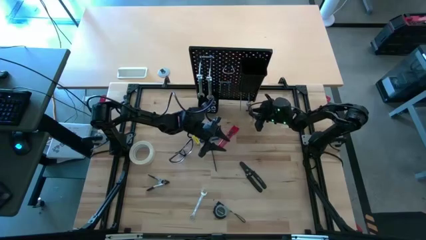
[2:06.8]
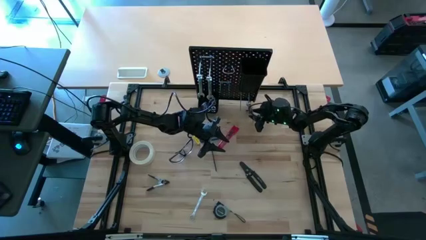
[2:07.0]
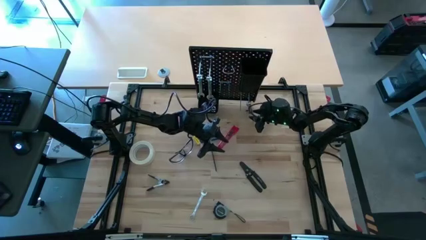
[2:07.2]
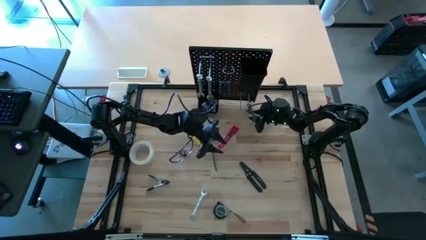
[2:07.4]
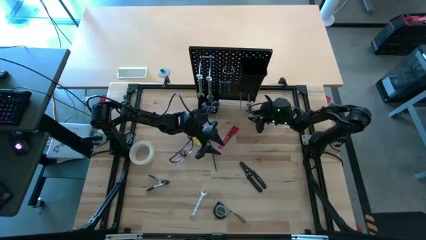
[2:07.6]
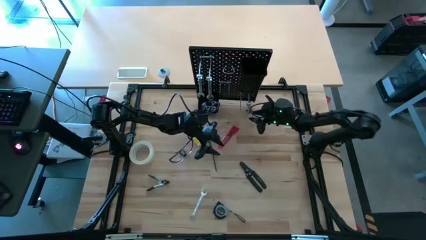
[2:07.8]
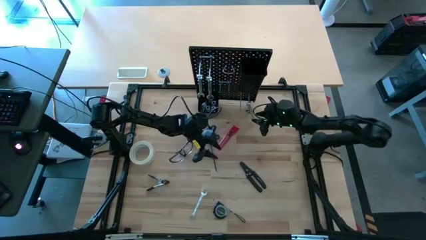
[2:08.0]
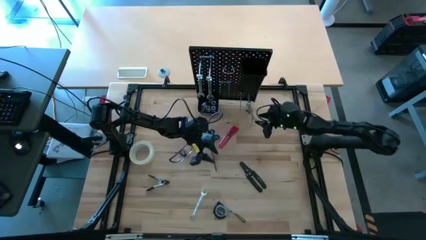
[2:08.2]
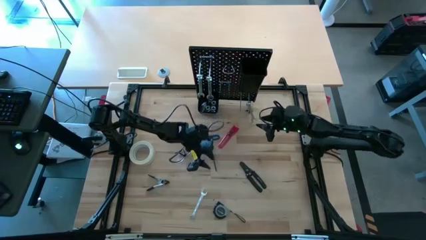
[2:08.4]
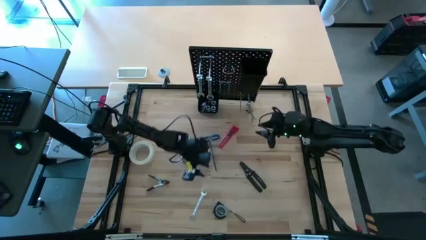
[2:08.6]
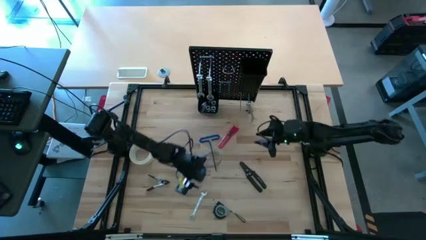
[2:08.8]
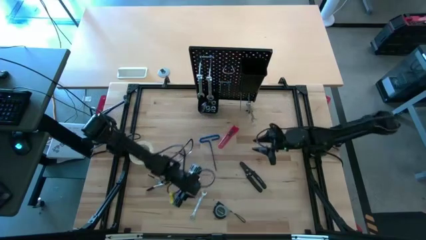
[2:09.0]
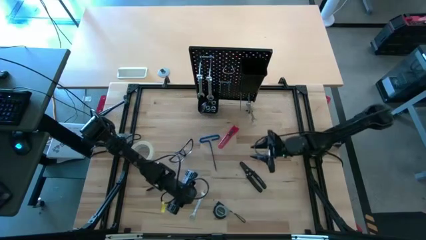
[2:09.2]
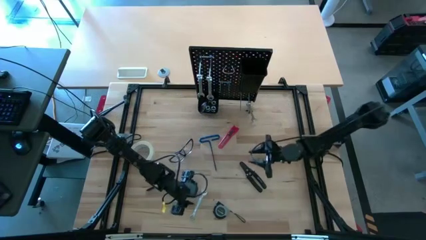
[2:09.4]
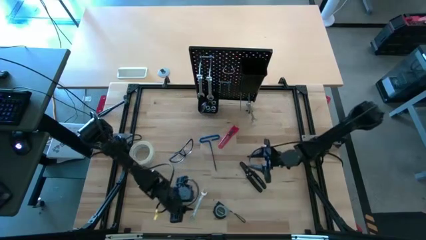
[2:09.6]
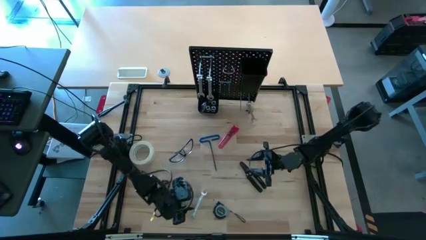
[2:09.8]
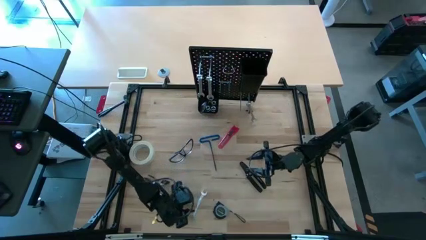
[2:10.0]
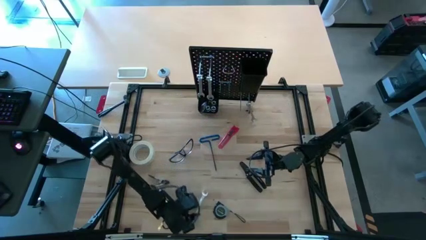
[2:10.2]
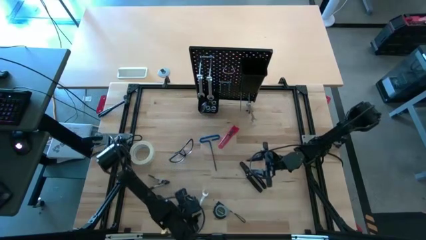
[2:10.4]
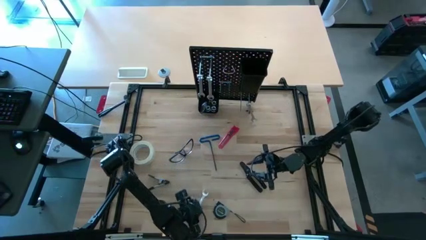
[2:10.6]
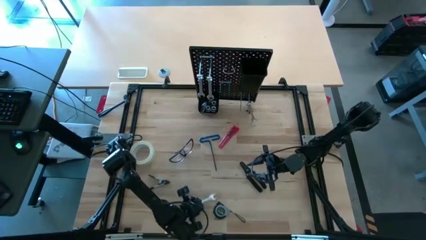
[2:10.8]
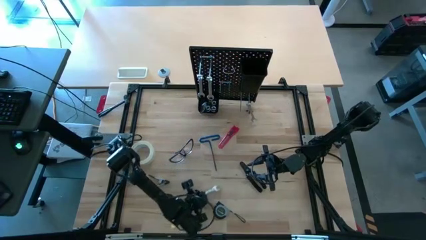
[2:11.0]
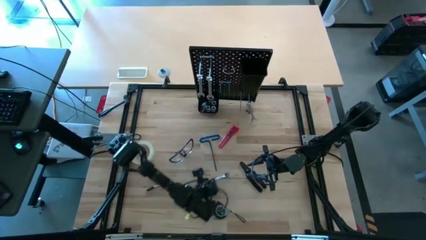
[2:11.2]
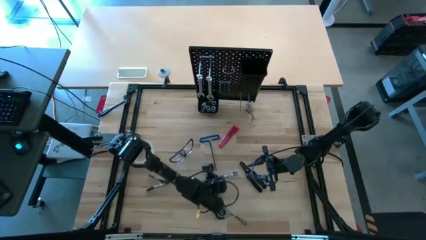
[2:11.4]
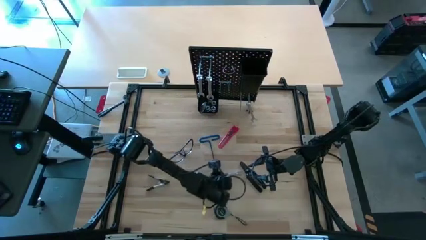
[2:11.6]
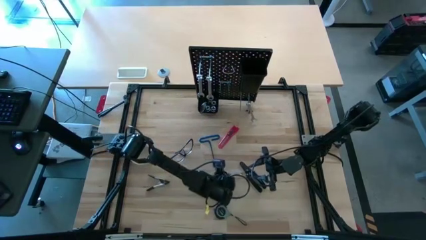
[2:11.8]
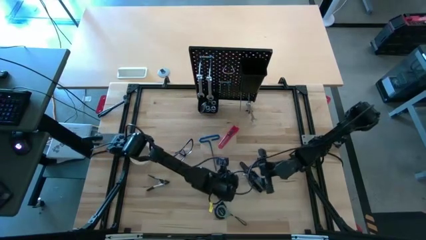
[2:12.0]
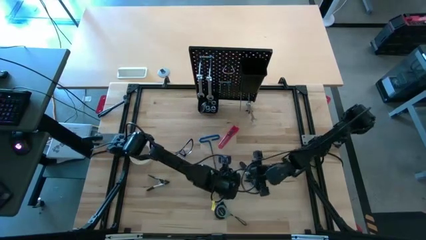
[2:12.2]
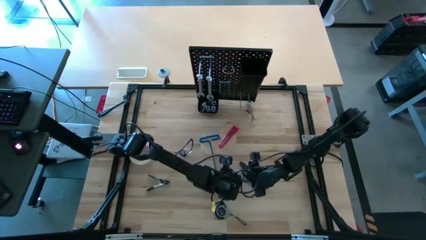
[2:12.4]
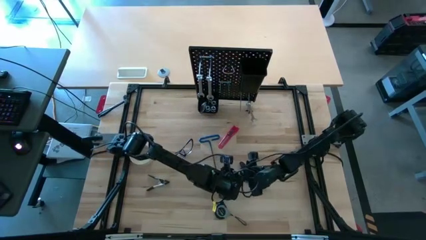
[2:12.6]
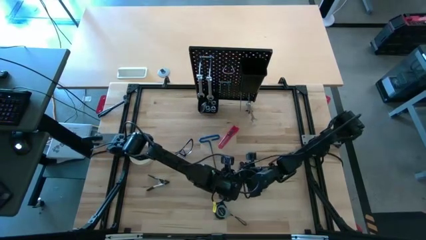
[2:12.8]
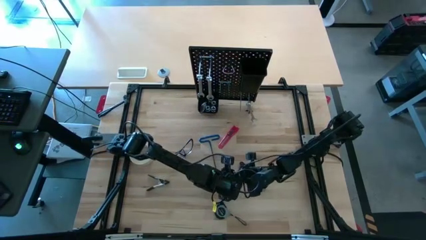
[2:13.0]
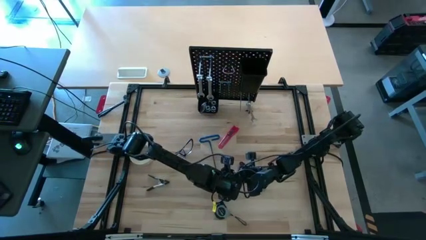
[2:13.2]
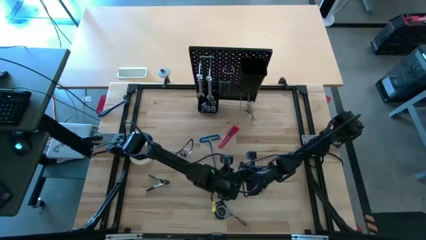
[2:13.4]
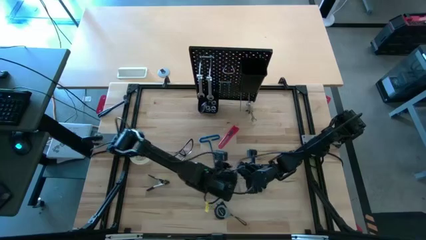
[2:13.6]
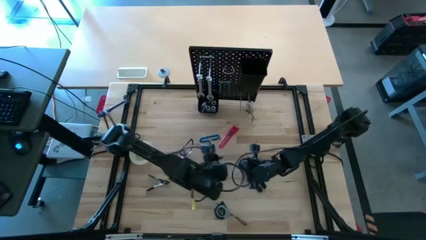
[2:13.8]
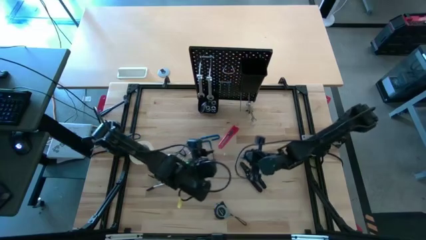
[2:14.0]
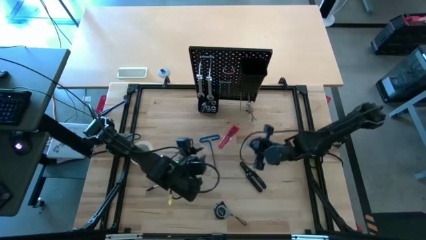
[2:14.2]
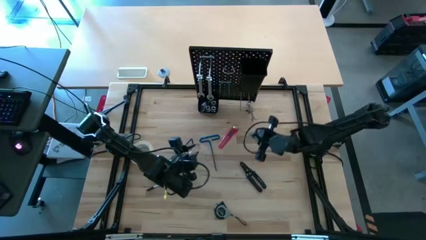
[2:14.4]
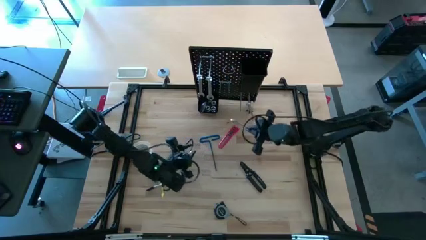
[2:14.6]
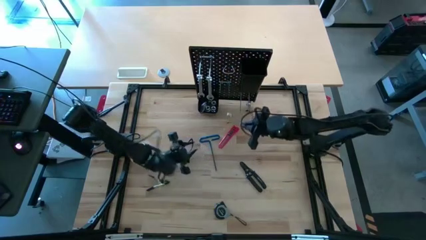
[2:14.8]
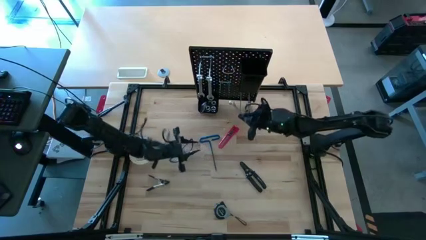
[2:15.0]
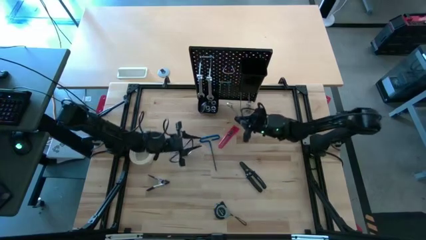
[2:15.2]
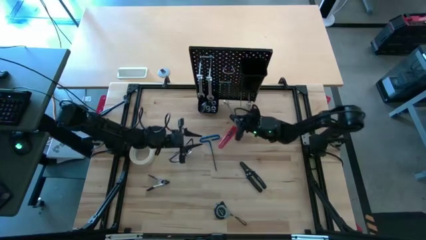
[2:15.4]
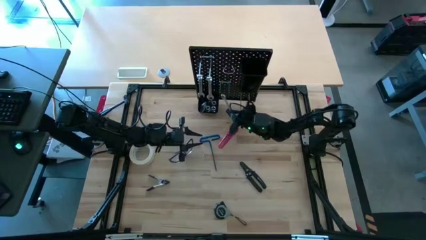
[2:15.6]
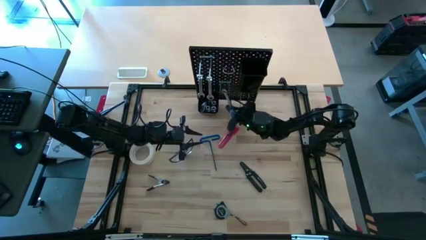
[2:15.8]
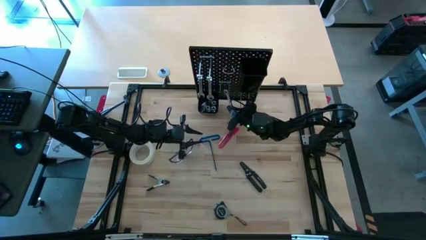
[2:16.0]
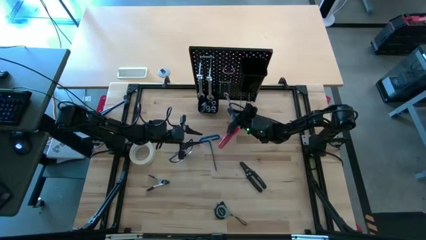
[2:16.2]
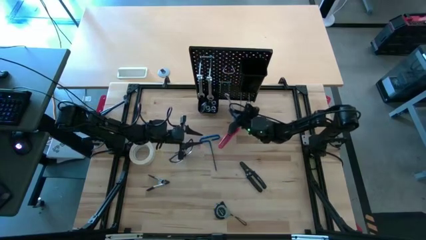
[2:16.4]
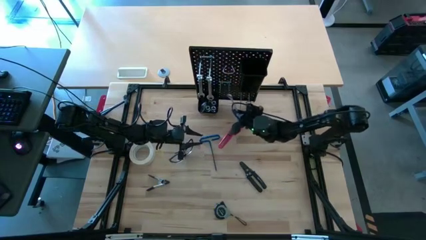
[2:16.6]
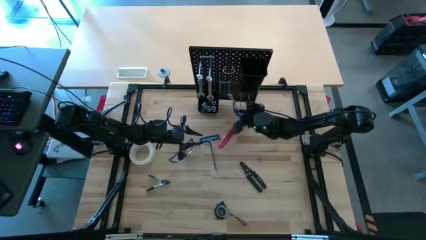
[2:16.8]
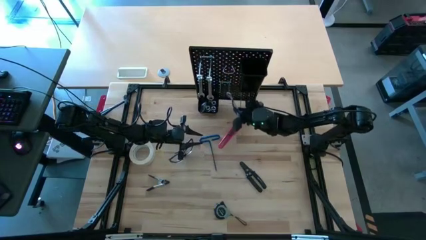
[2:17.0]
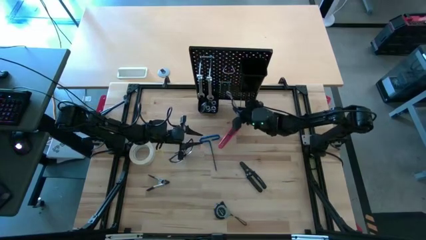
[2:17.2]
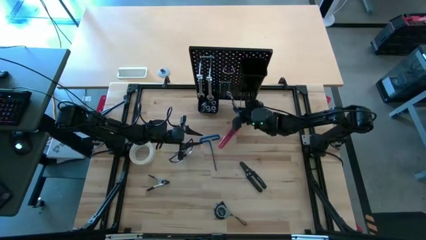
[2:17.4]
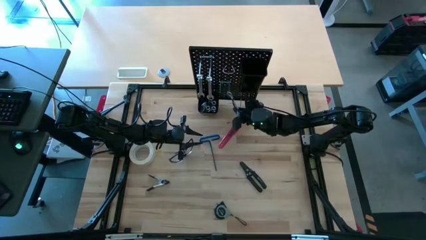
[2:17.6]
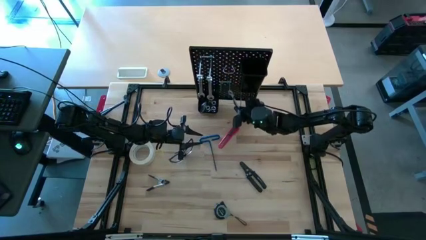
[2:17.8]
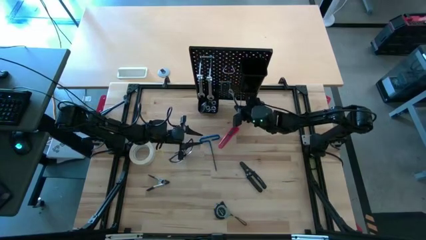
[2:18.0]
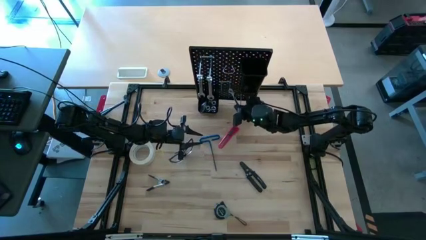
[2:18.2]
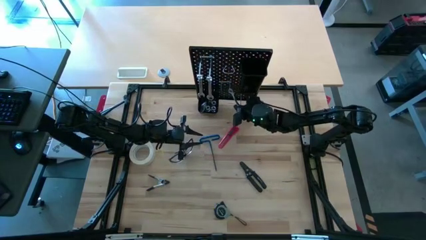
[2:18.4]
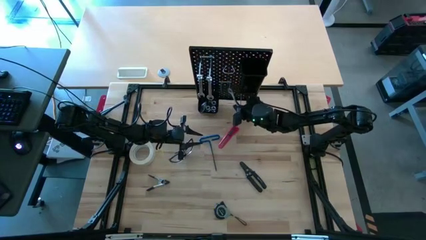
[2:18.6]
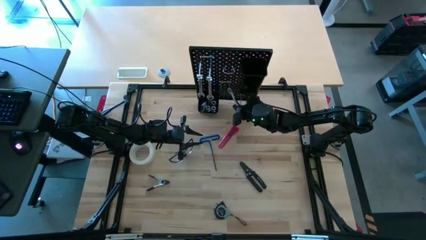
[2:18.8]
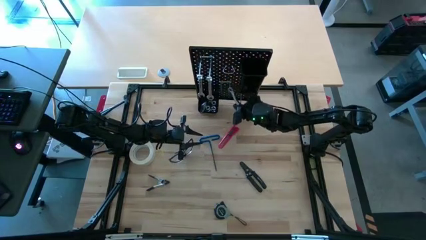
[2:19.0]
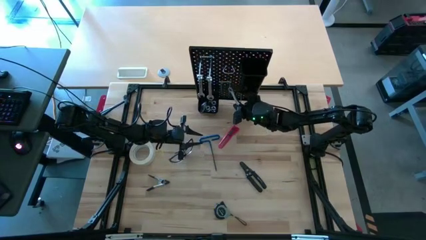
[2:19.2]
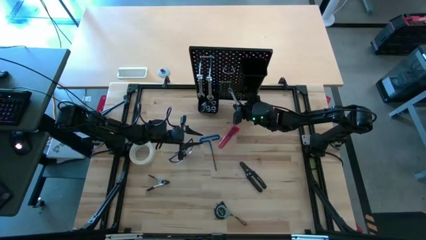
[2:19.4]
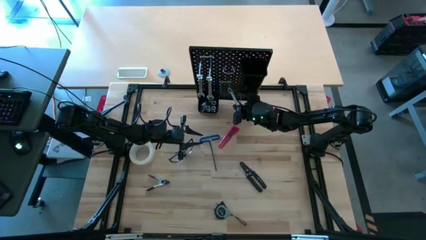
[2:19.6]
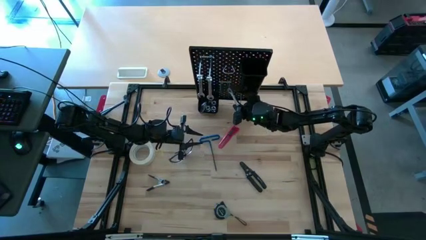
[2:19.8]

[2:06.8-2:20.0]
Task: Hang tools onto peg board
Hang the wrench onto the peg board

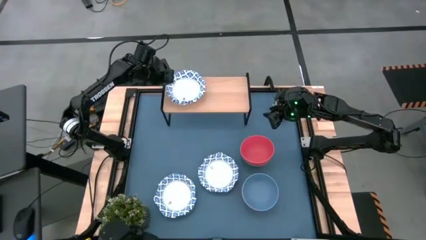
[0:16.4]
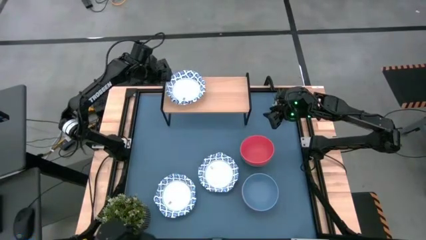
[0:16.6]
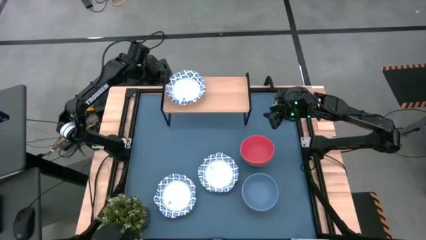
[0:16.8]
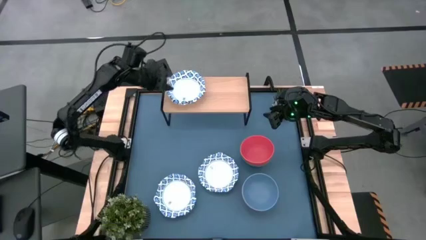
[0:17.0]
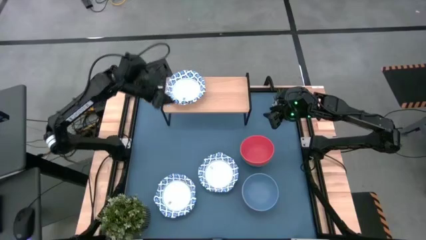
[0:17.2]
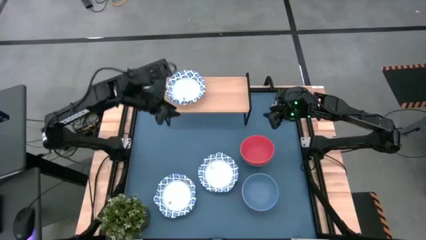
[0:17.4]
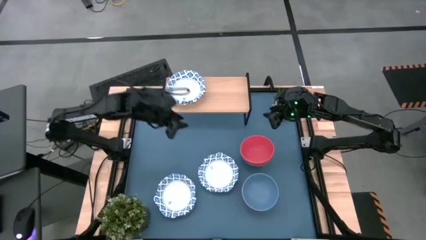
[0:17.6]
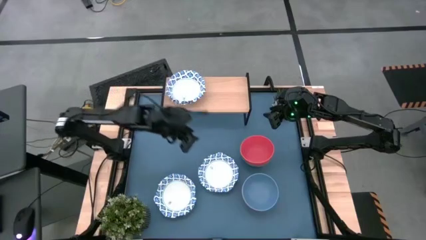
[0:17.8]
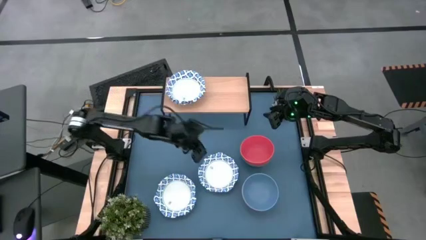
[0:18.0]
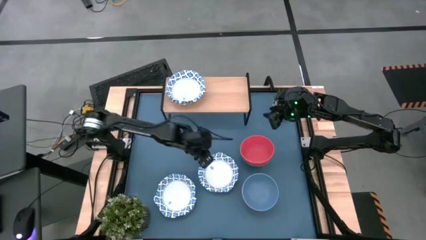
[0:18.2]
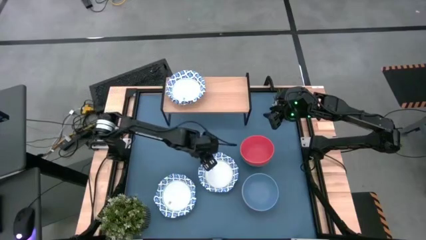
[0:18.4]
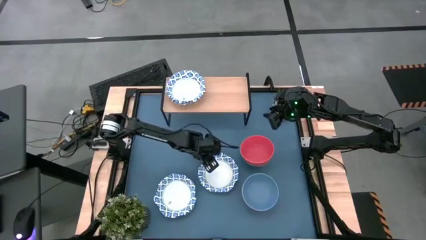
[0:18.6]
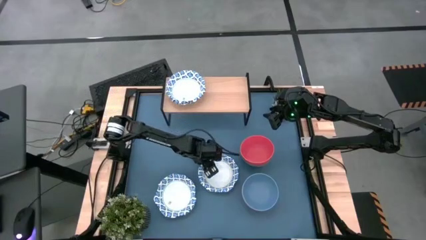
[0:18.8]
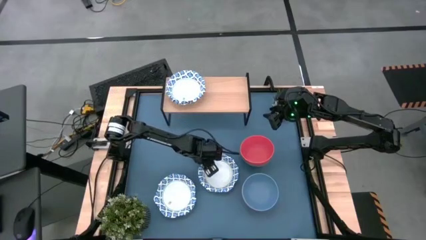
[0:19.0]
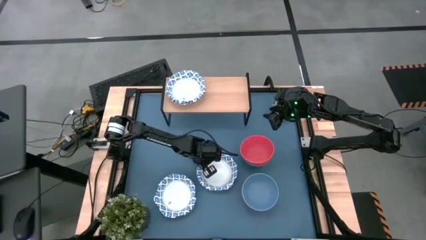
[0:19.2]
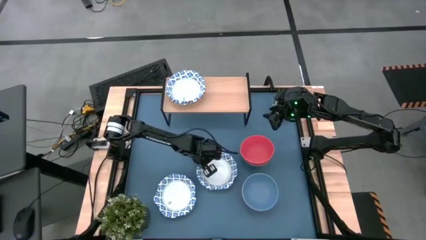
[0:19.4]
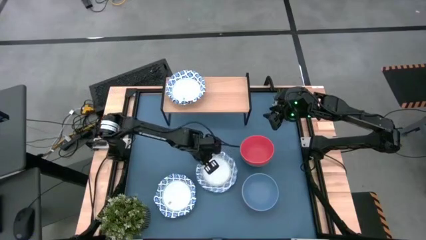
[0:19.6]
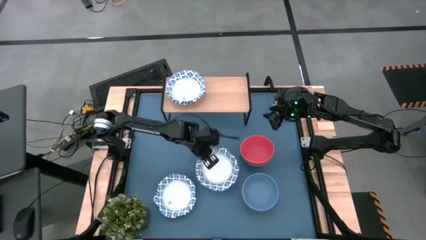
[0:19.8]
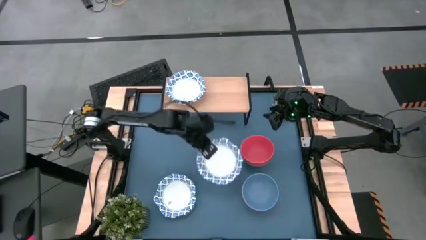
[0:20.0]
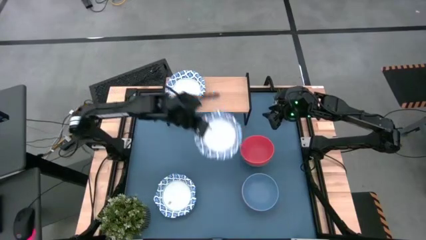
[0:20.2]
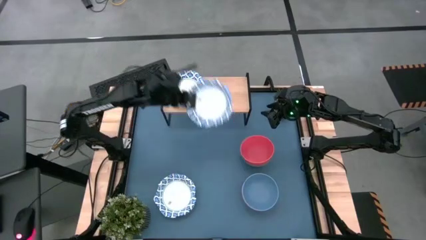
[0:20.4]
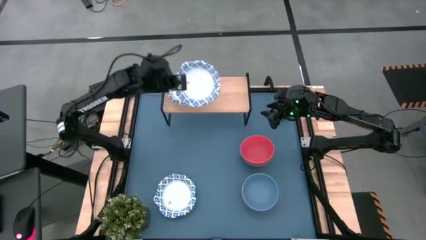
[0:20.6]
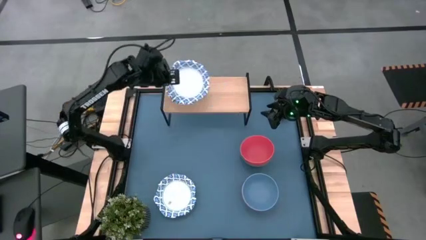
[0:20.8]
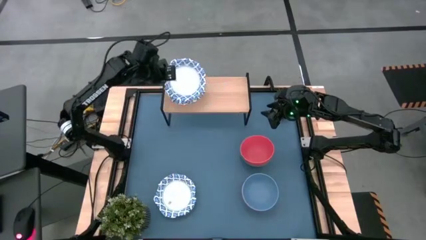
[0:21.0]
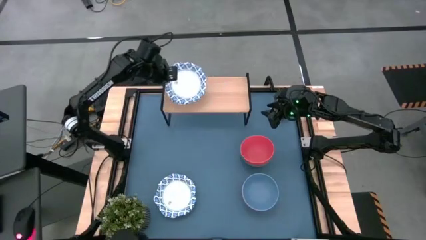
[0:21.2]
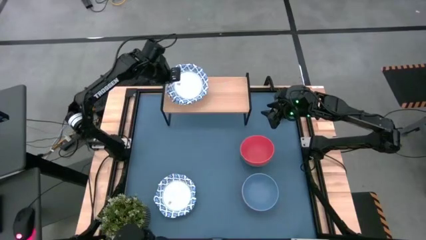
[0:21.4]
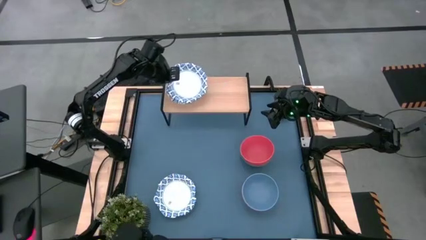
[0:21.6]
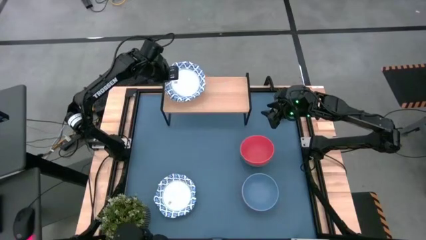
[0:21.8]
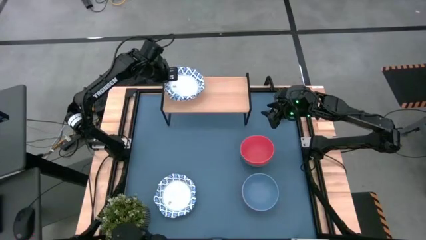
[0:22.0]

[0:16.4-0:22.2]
Task: Place and stack bowls onto a shelf
Stack the white bowl on the white bowls on the shelf
